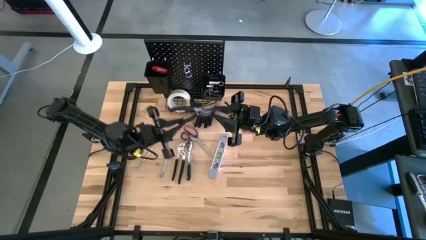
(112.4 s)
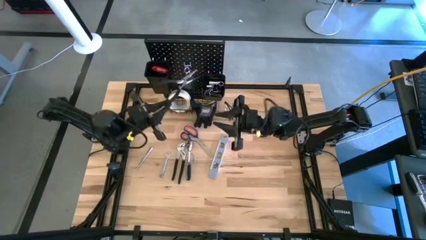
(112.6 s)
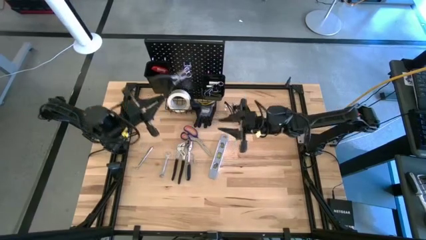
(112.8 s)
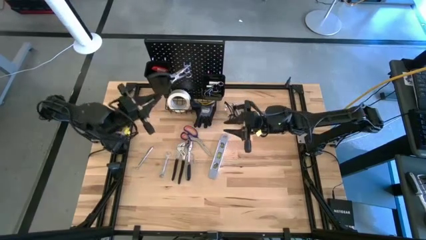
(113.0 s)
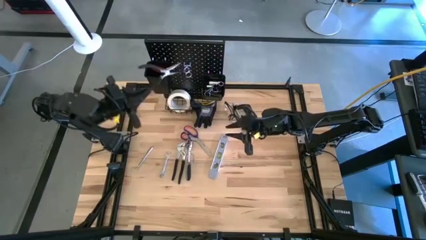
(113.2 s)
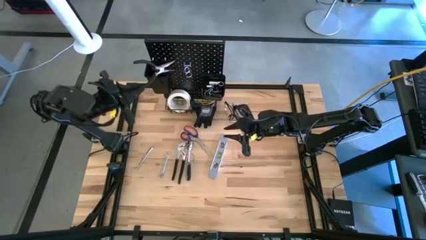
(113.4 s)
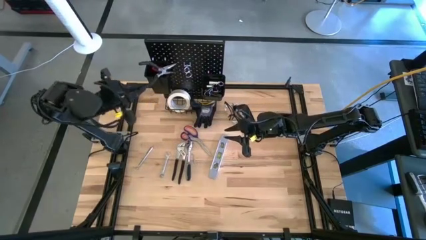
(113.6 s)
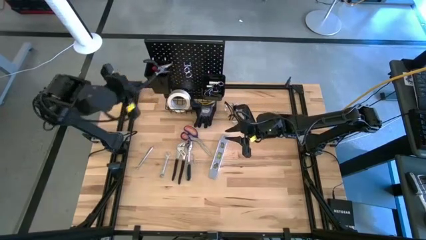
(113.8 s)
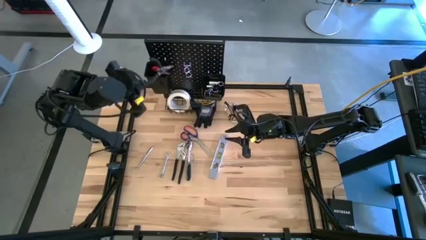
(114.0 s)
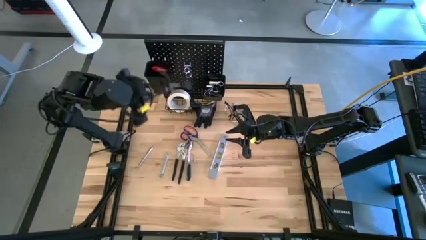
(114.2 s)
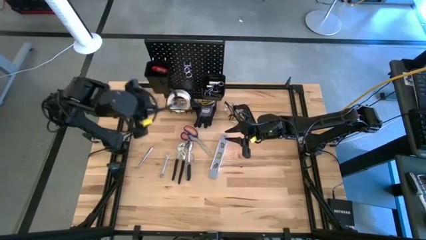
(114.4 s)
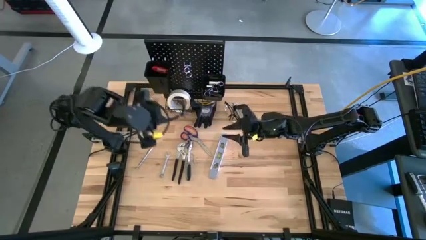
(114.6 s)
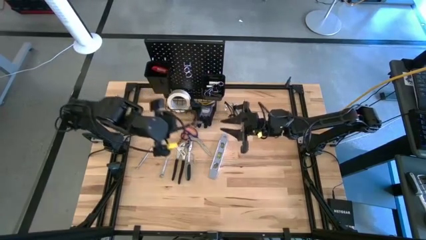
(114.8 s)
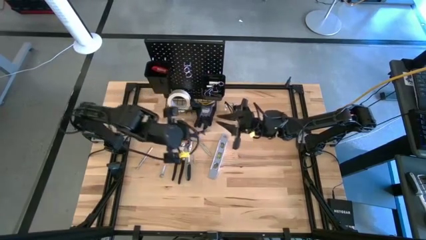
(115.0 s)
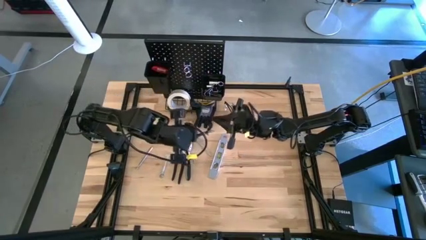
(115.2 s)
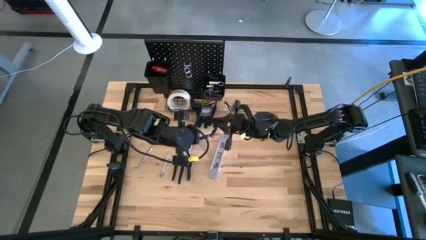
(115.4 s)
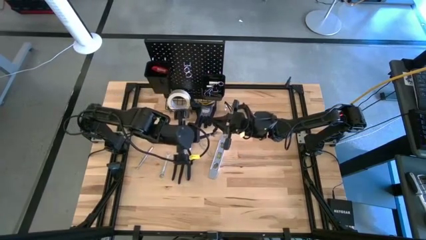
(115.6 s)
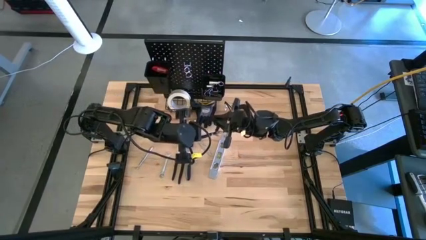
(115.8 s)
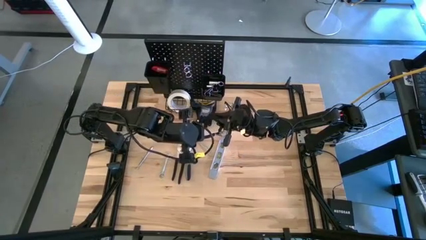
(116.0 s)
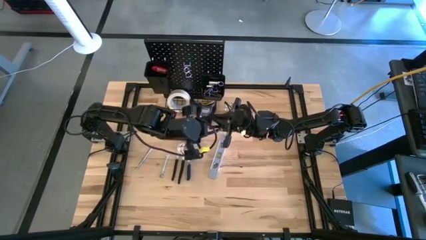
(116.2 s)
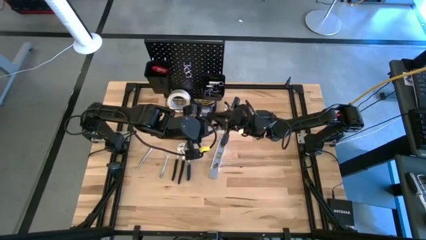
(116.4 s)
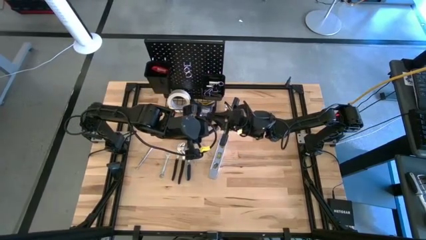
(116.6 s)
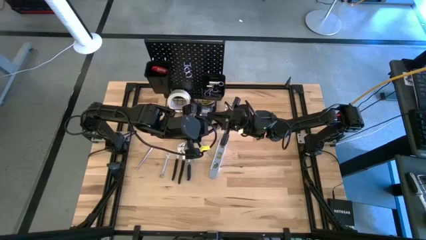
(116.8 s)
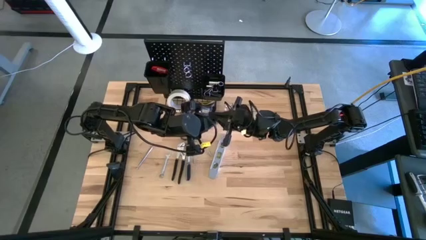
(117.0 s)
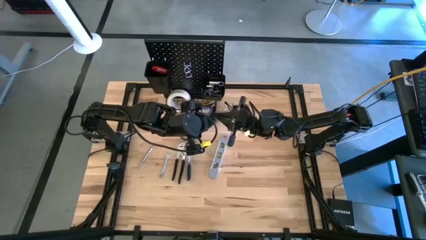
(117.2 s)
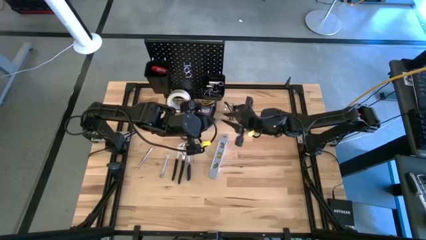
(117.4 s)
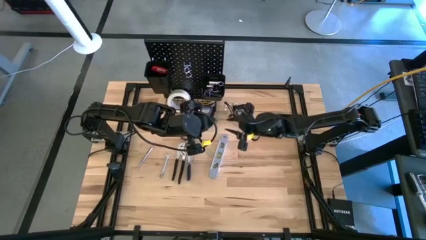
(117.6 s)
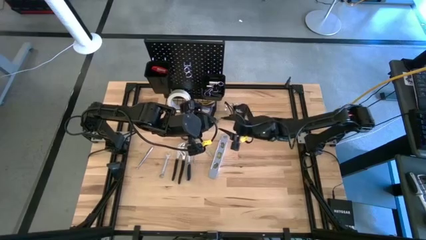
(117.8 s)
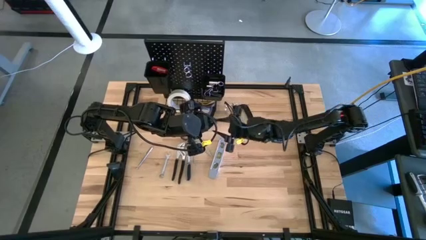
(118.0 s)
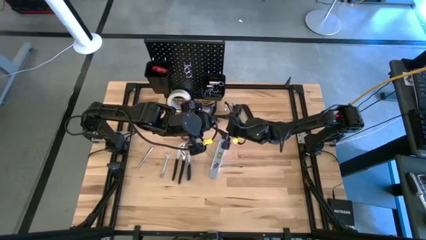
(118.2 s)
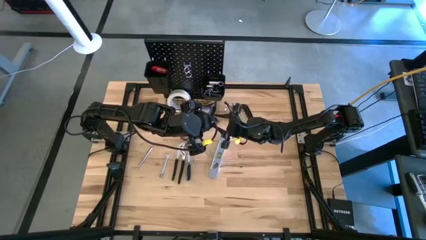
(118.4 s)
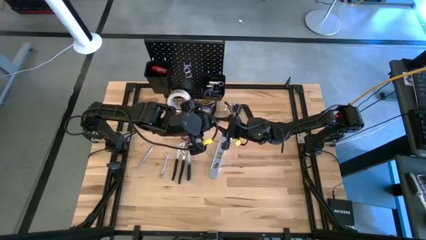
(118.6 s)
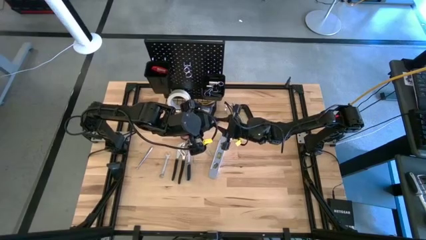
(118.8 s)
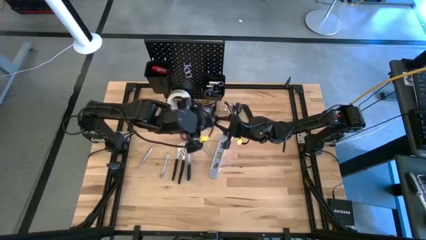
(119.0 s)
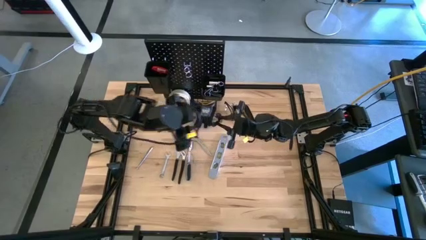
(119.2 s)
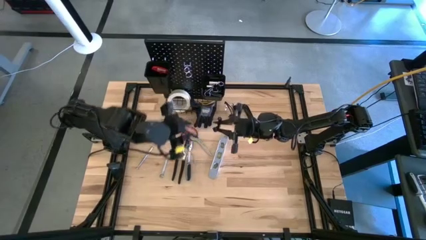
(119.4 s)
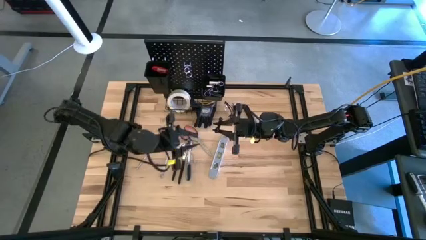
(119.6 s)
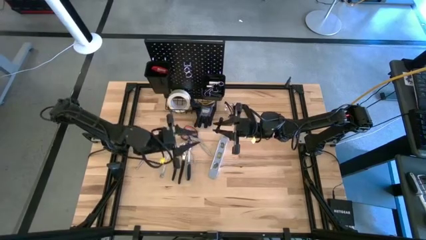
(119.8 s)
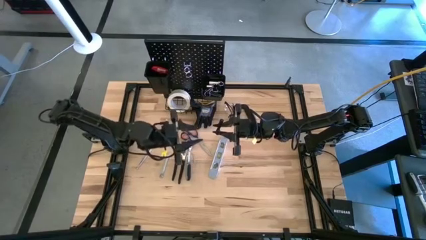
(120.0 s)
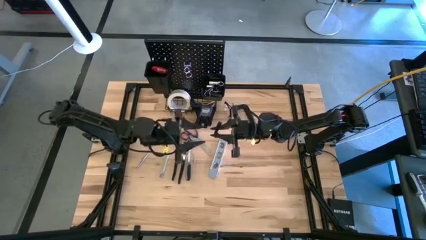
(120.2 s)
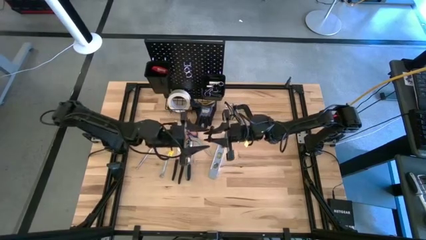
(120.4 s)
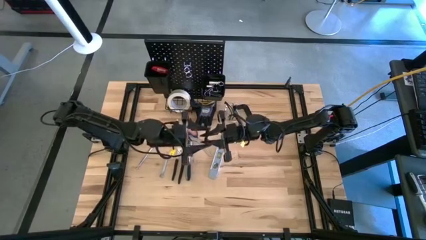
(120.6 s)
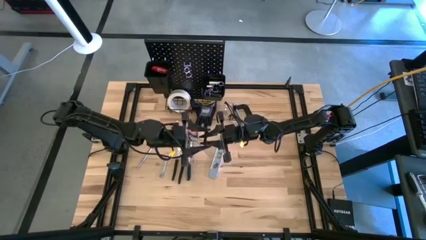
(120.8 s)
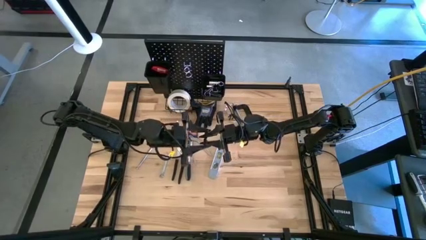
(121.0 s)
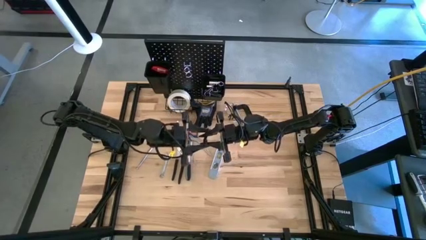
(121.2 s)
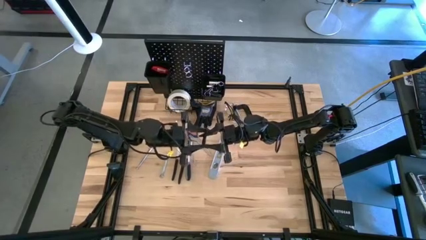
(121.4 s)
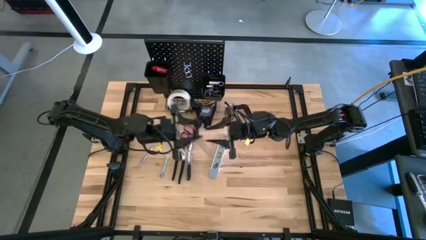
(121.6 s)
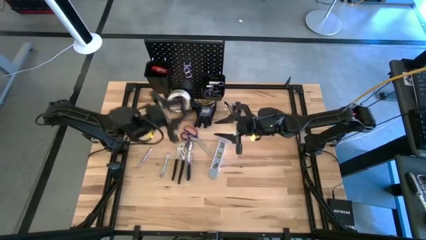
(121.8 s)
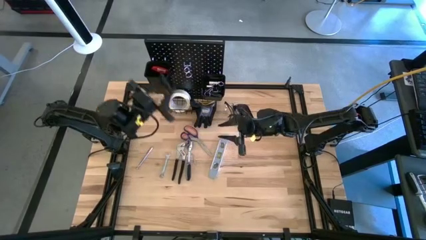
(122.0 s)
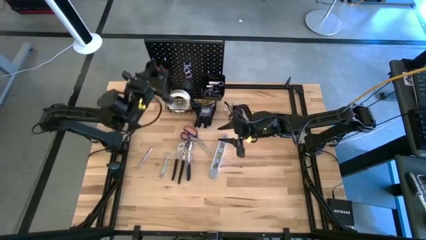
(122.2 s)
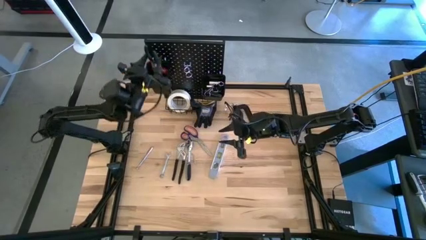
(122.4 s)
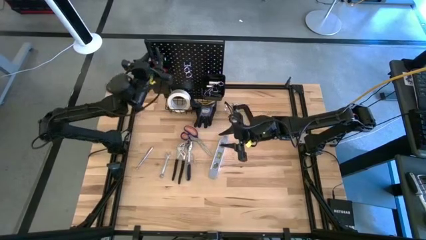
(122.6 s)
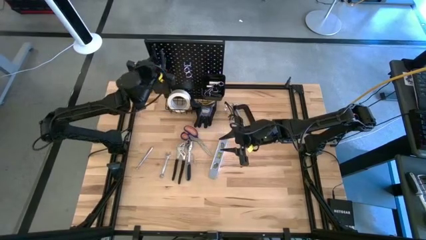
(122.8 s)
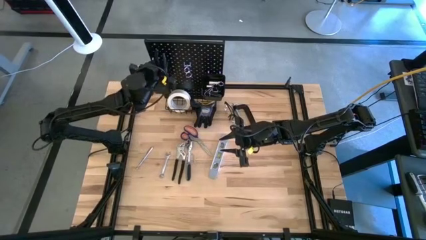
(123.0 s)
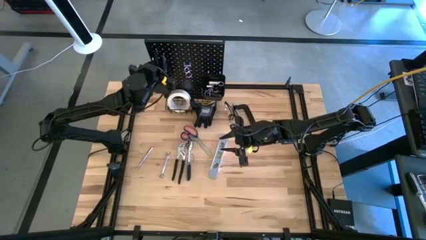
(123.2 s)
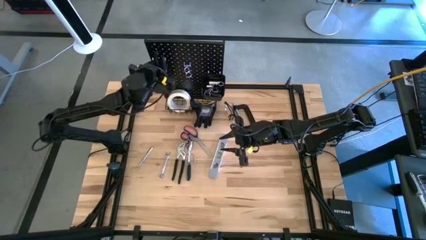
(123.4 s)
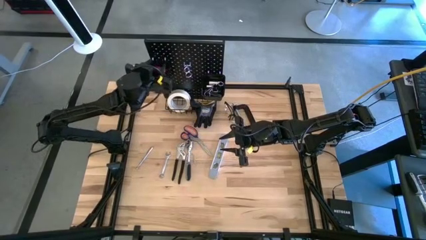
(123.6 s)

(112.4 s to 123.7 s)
Task: Hang tools onto peg board
Put the long nose pliers into the left black bin on the pegboard

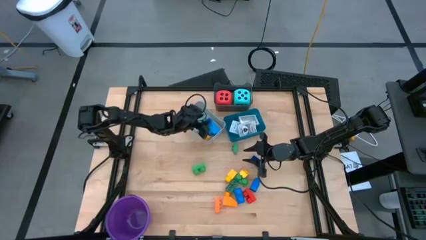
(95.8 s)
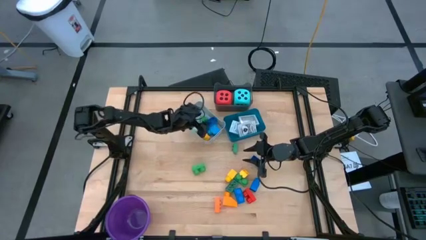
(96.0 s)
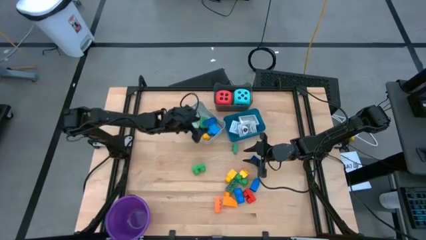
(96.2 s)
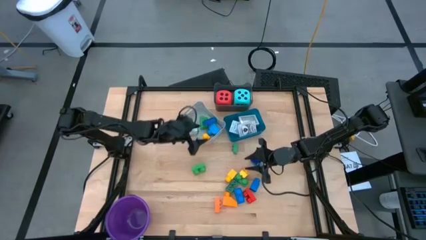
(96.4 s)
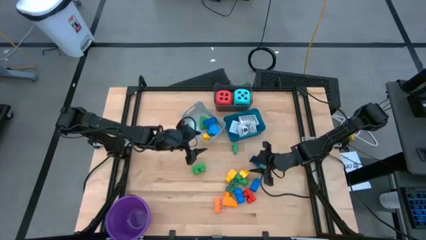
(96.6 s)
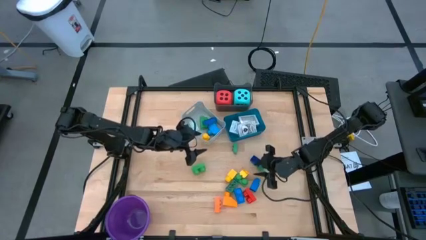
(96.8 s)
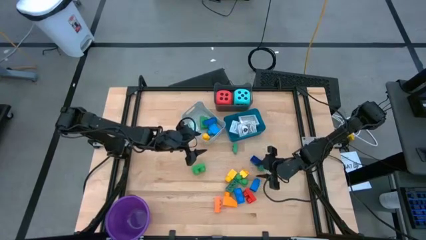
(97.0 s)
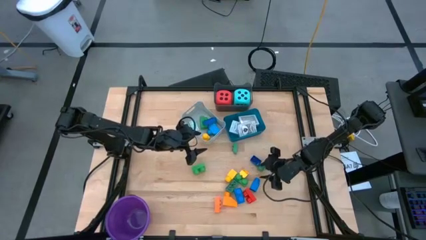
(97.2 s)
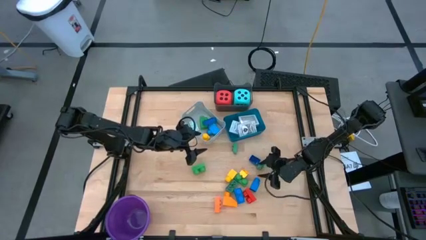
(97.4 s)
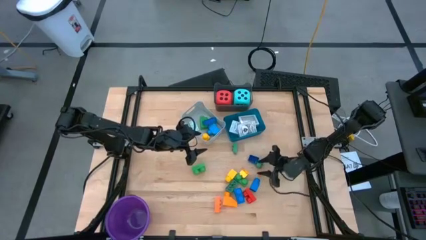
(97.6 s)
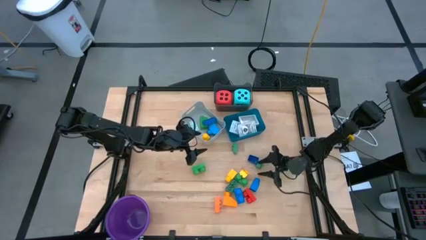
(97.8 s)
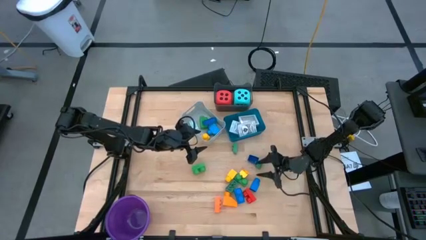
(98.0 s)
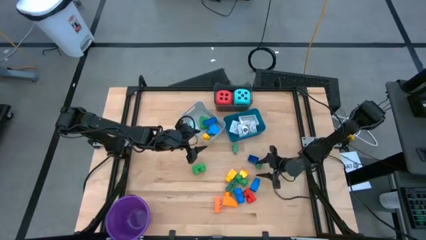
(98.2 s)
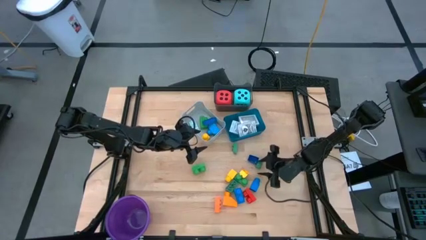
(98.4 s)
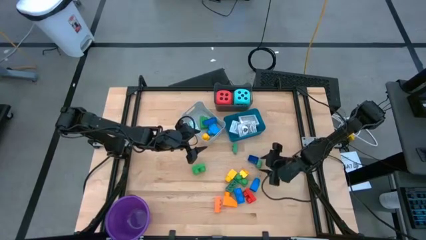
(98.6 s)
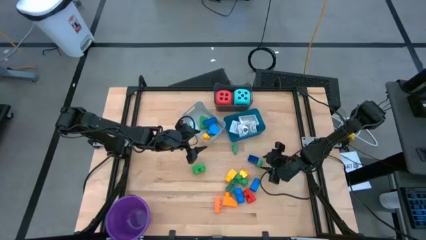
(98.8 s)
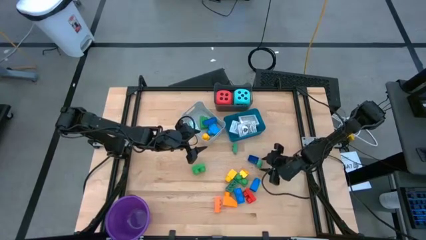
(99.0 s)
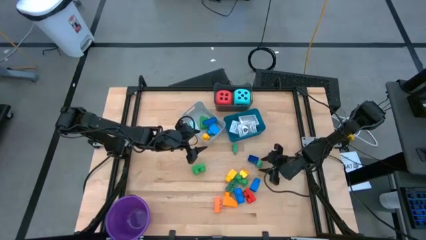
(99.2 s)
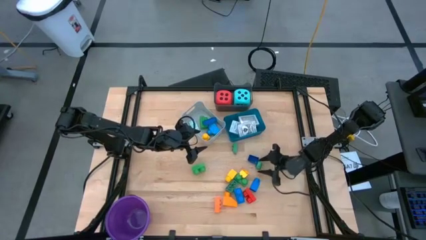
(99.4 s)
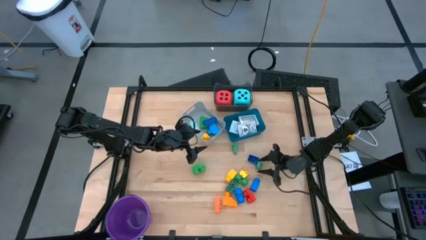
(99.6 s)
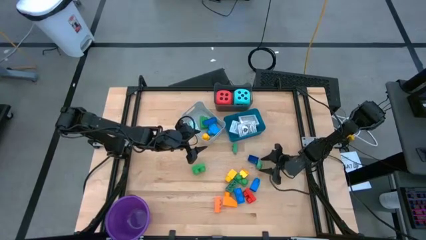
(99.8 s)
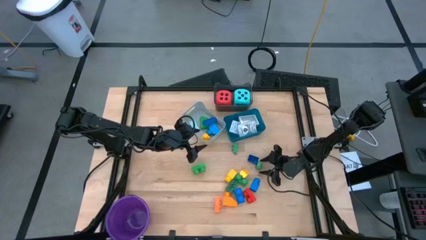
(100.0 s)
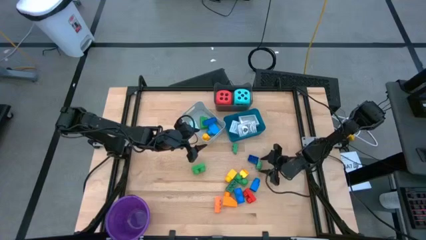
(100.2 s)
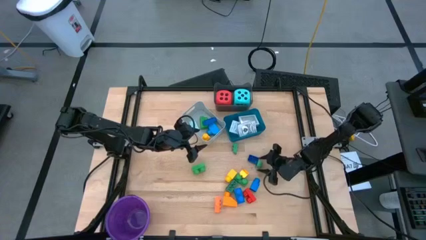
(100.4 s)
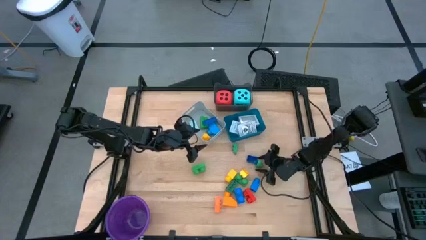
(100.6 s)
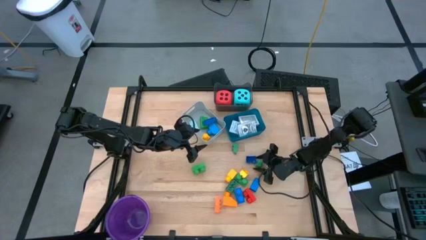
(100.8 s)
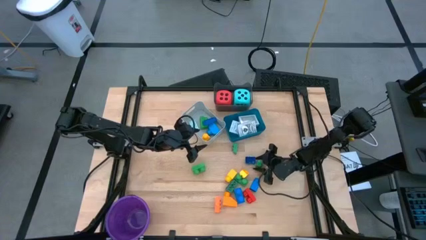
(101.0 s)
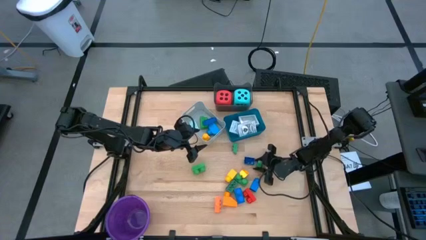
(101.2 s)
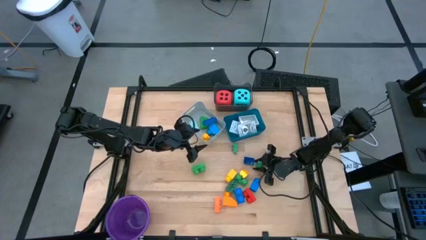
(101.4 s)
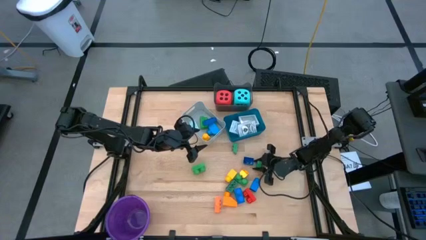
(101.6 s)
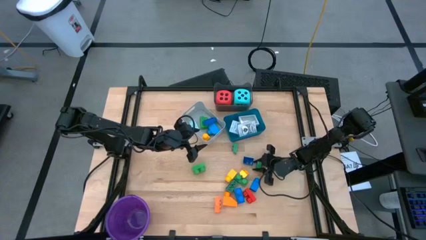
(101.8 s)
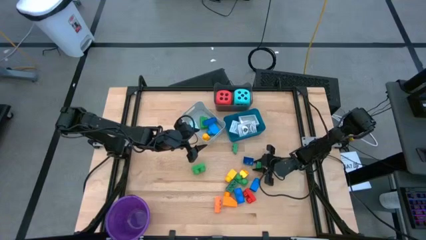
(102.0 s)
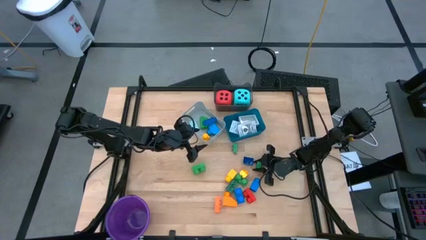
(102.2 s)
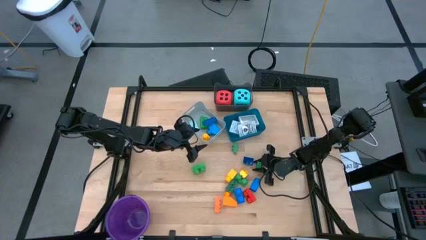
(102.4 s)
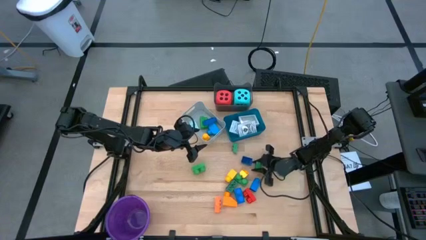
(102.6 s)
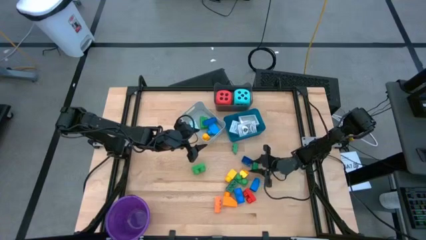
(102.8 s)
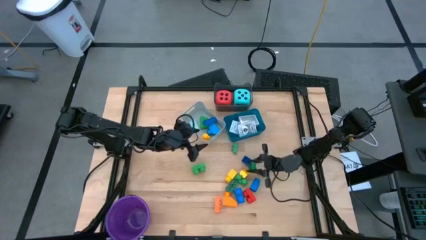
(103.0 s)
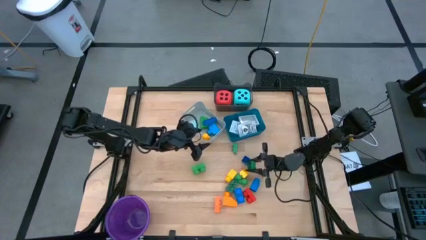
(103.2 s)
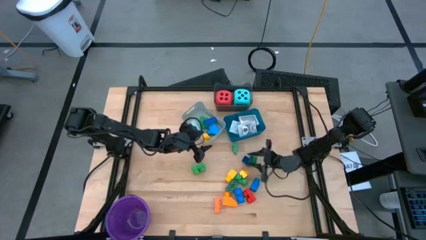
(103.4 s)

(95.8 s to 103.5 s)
Task: Pick & Place Toys
Put the green game piece into the gray bin
